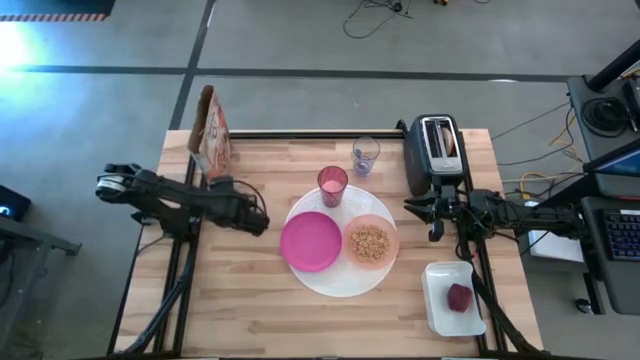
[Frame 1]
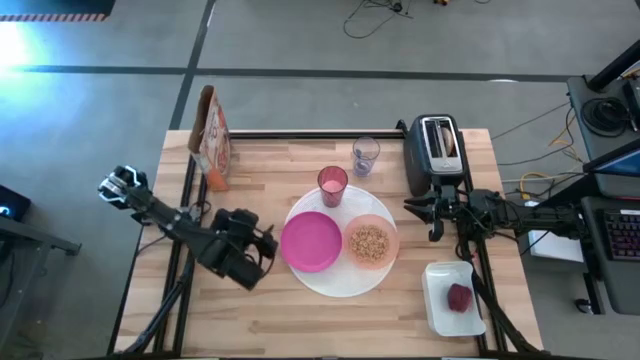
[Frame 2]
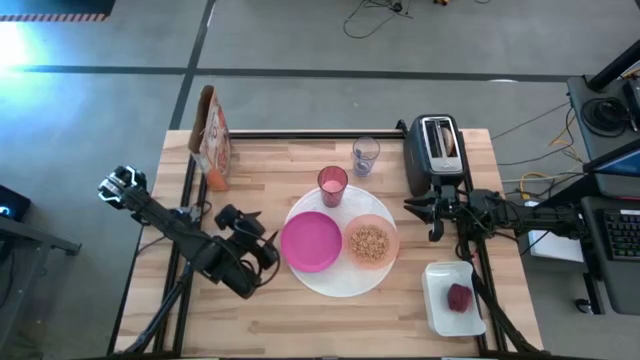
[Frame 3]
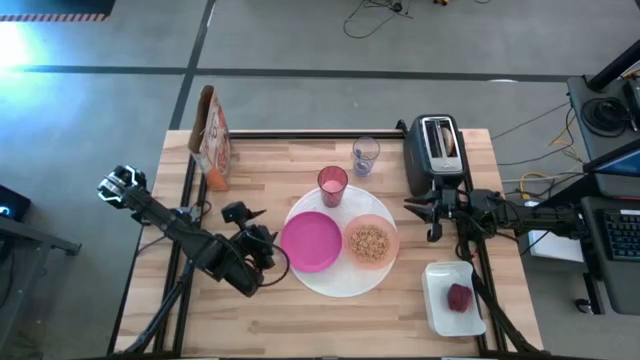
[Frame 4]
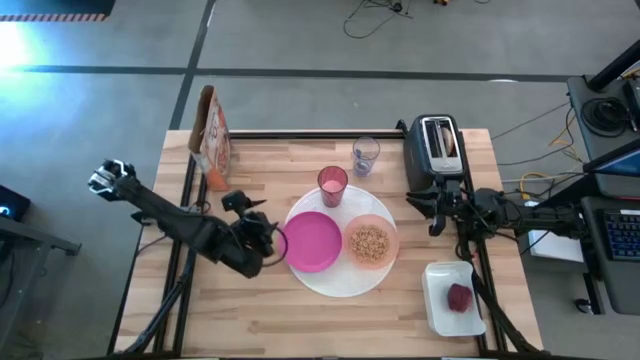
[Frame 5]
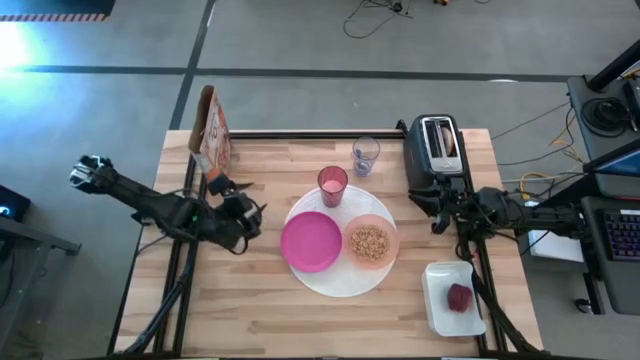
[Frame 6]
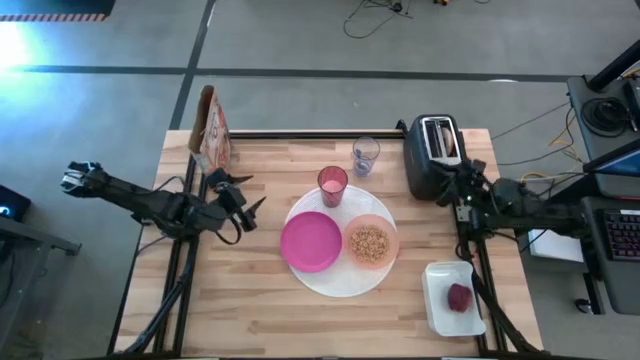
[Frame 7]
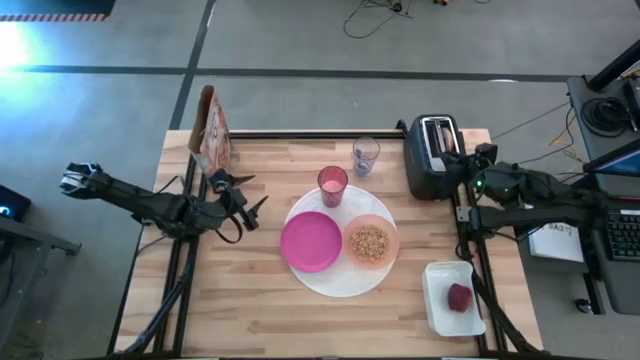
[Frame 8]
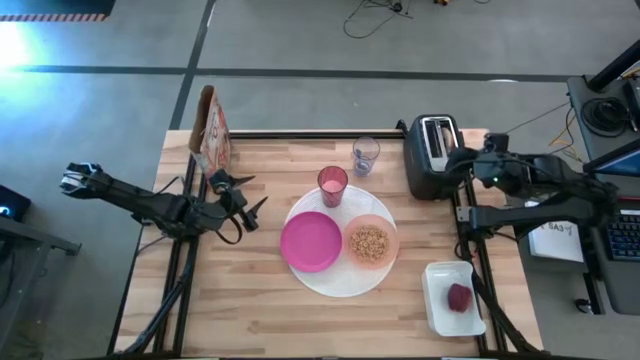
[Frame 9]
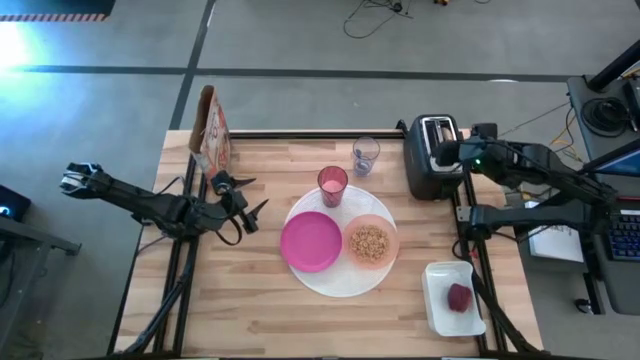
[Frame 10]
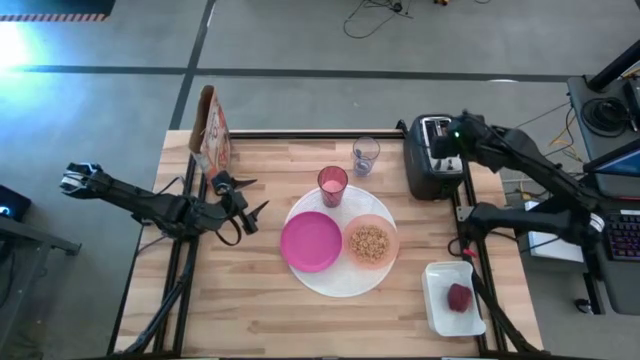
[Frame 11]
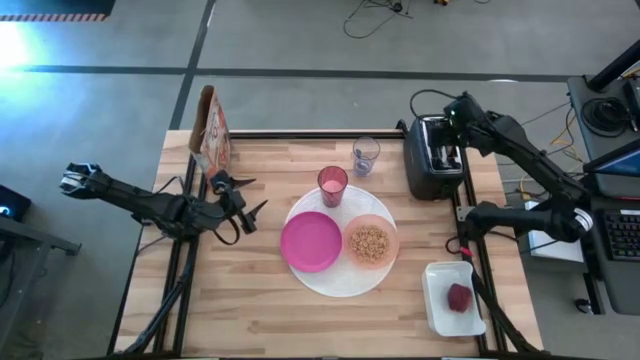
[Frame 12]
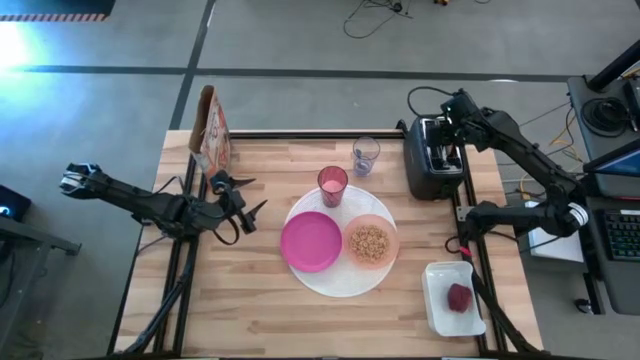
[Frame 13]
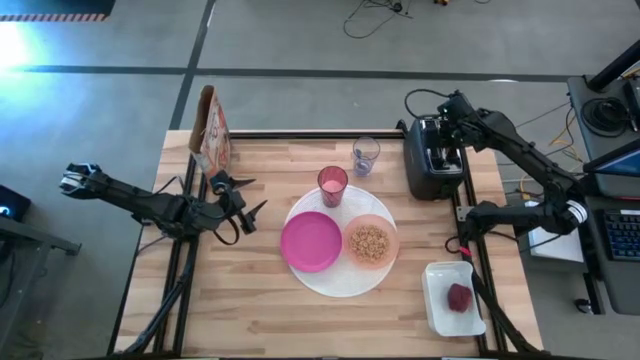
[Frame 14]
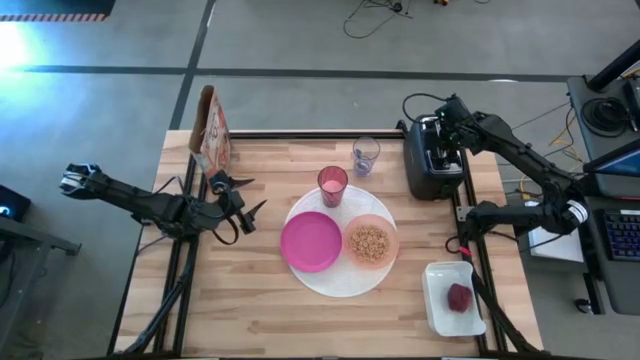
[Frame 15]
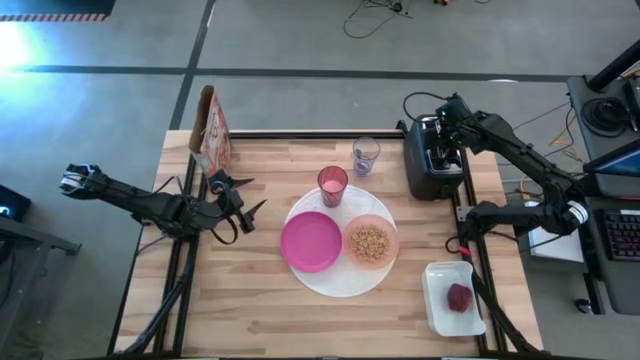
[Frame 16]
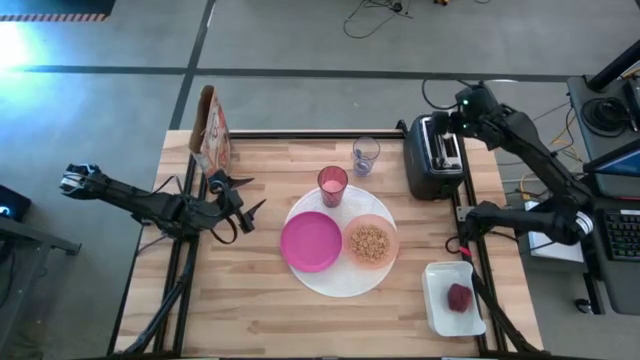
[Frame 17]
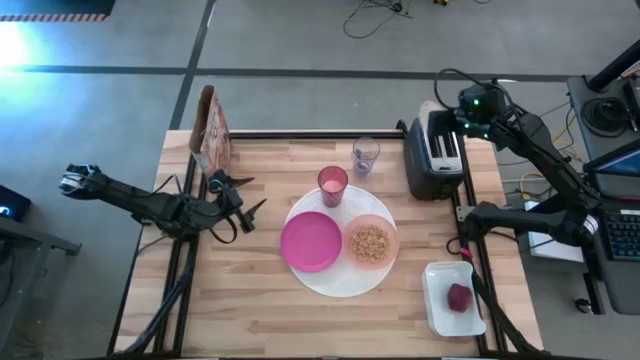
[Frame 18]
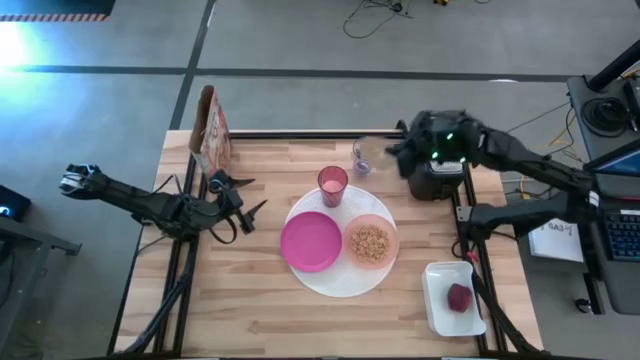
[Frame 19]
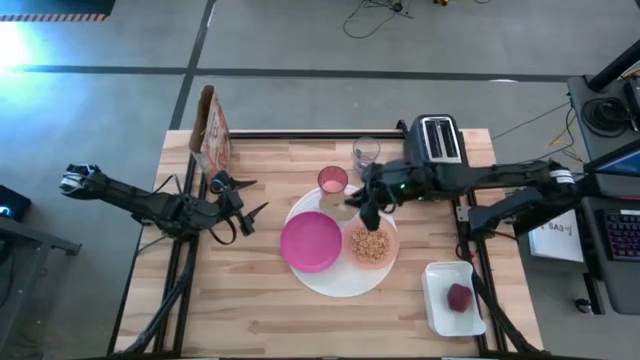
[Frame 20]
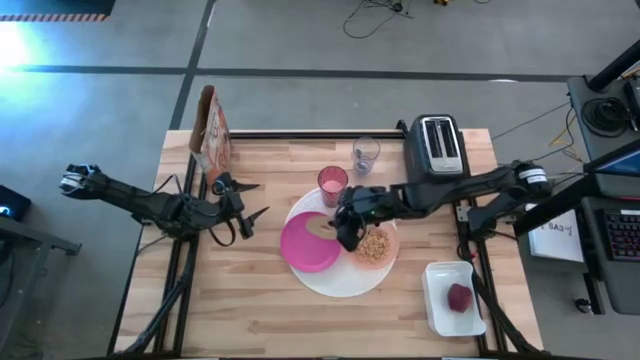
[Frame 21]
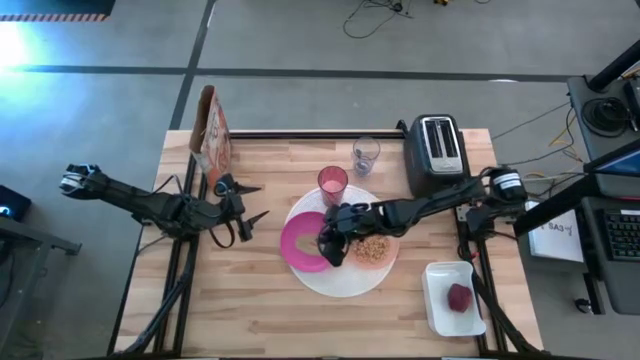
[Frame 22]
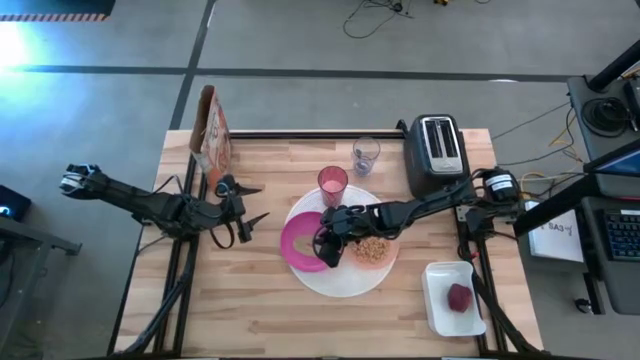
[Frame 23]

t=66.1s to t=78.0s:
Task: Arrange a breakfast setting
Put the bagel on the pink plate

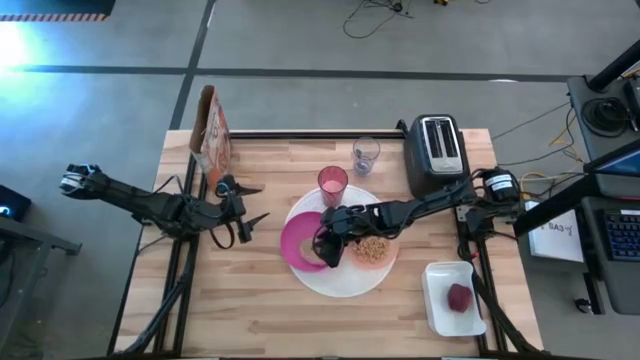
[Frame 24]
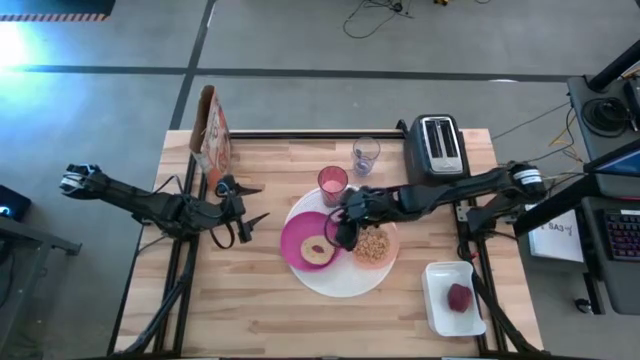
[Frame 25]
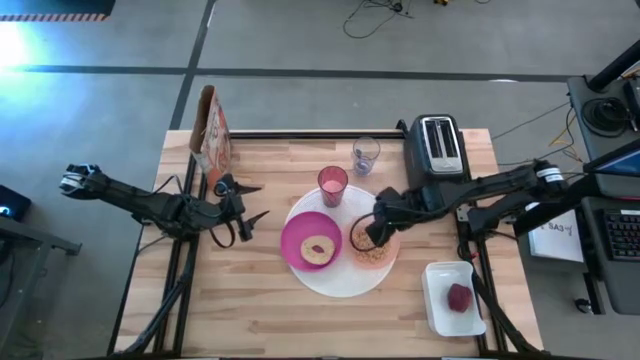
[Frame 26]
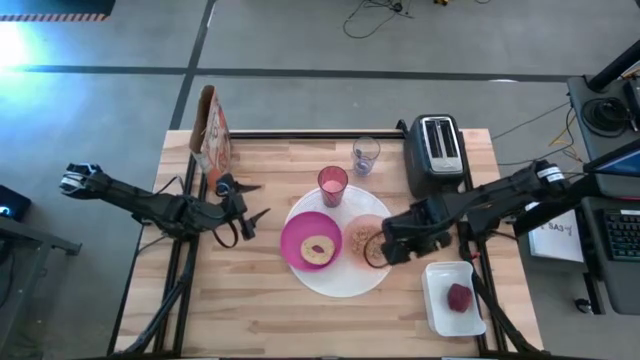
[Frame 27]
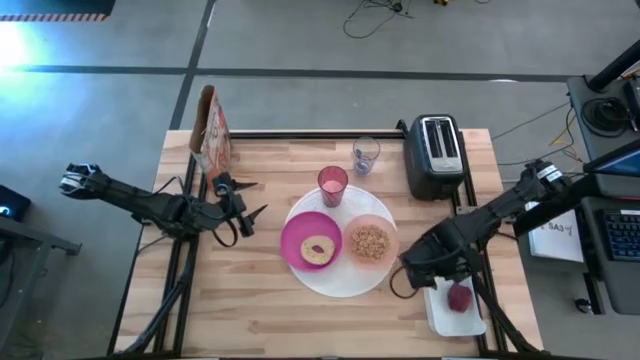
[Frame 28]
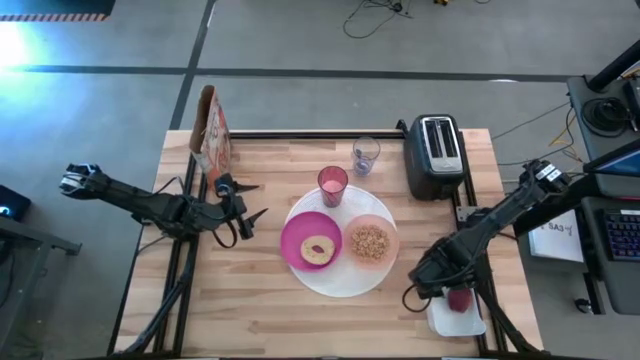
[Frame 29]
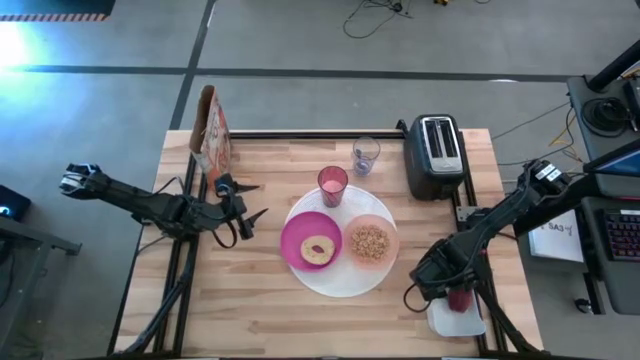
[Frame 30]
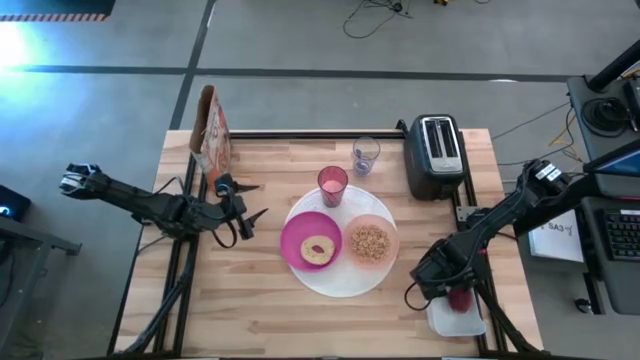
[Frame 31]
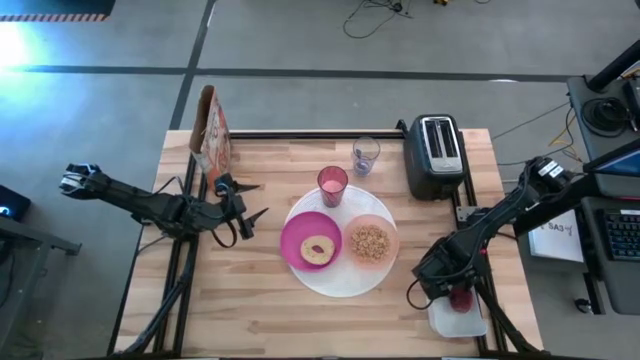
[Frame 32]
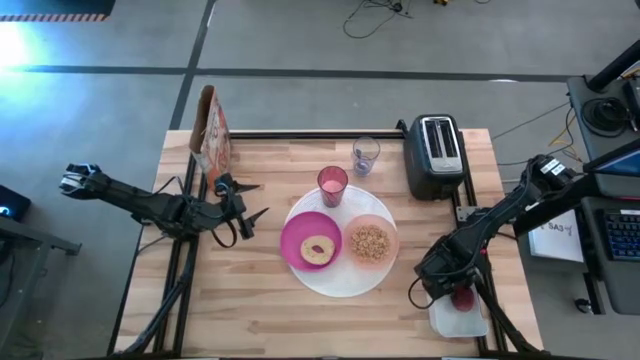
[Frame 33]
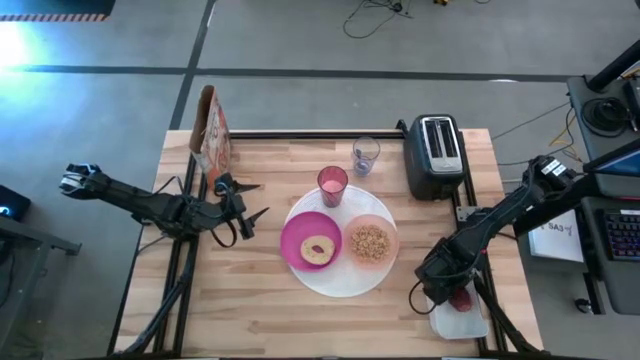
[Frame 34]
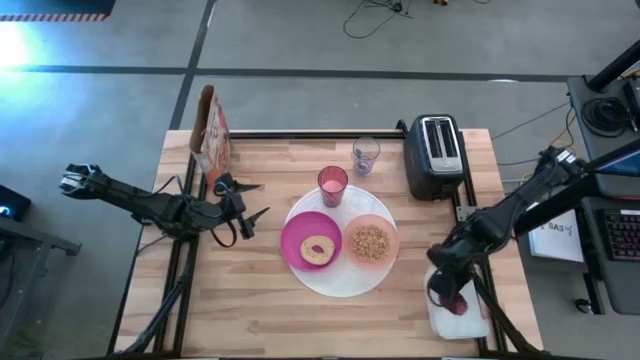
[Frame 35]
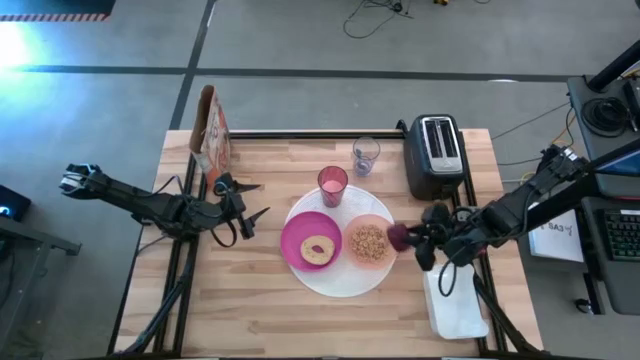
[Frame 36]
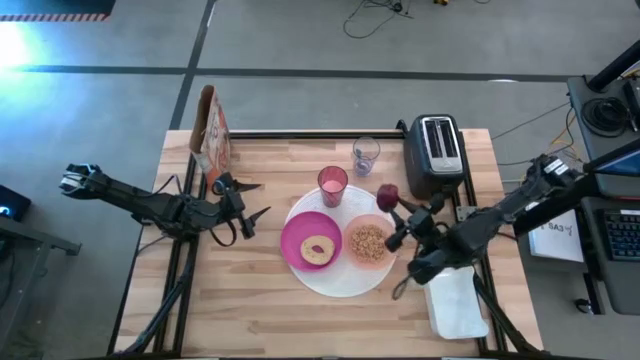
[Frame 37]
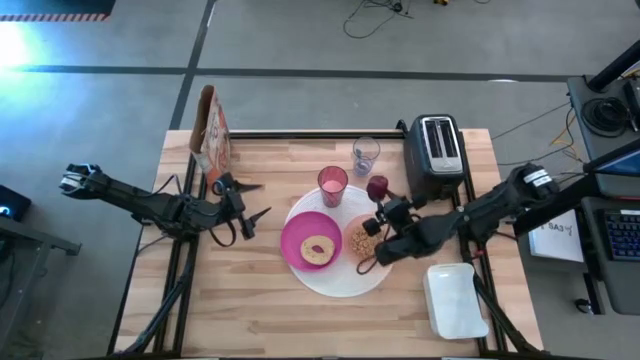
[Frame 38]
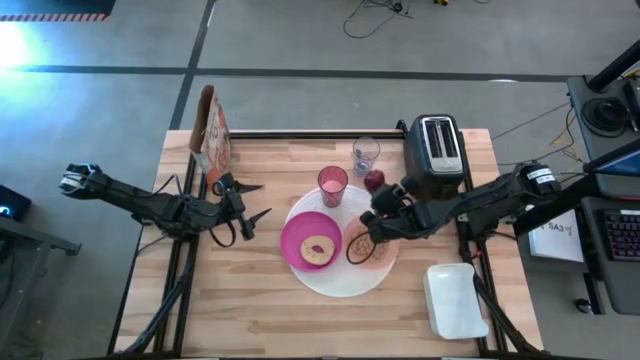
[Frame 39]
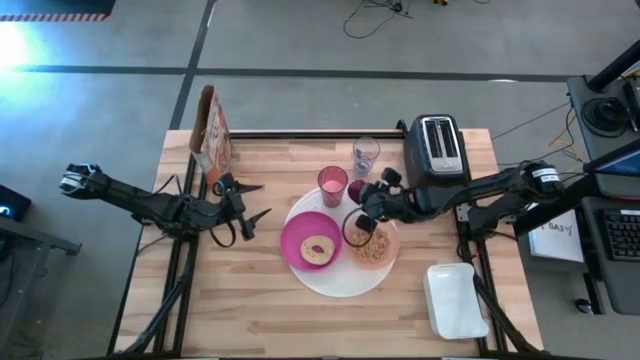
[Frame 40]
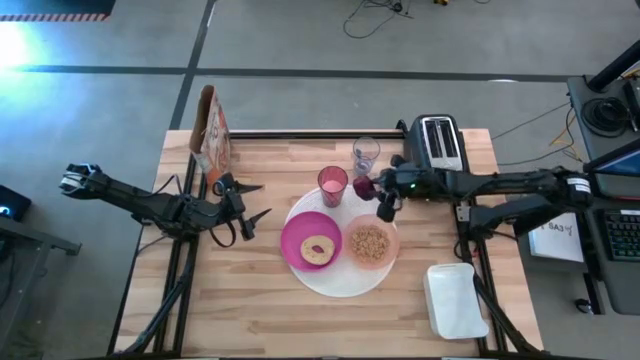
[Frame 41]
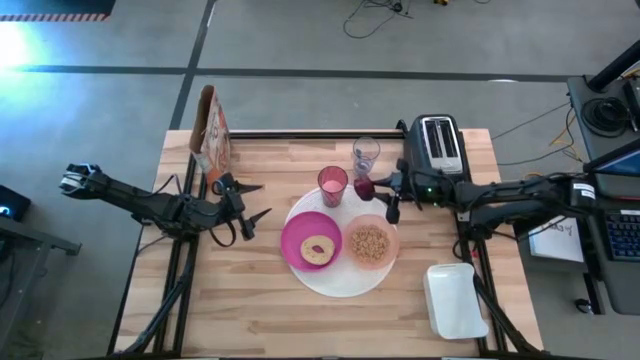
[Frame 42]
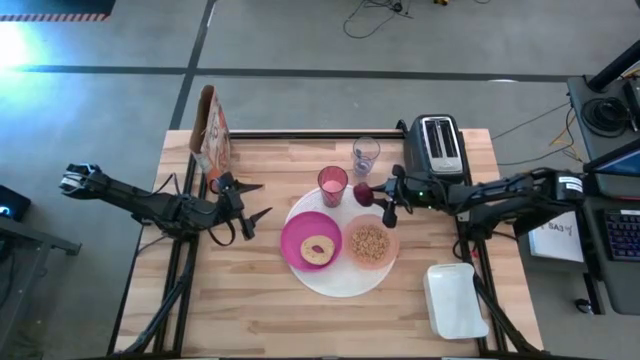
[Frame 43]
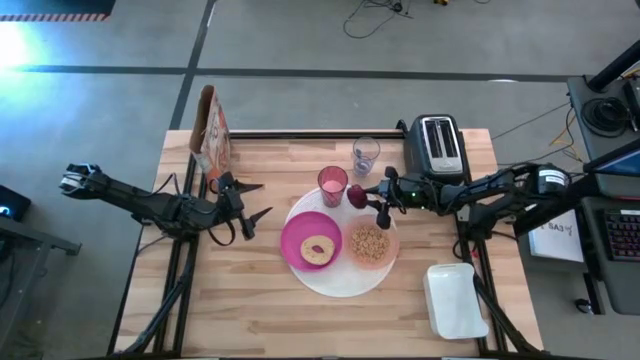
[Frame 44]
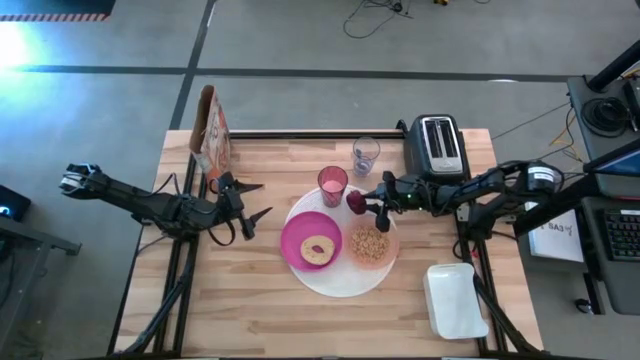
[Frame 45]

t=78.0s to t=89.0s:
Put the red apple to the top of the orange bowl on the white table mat
